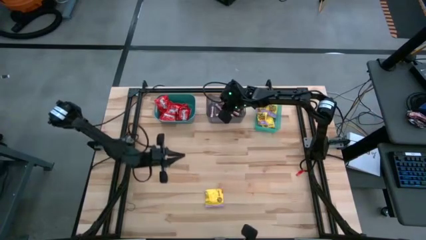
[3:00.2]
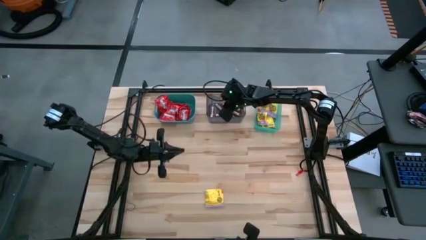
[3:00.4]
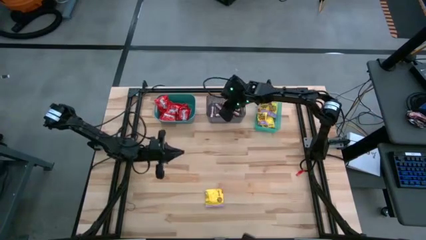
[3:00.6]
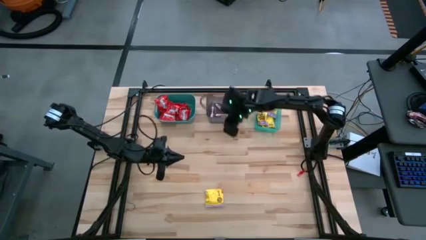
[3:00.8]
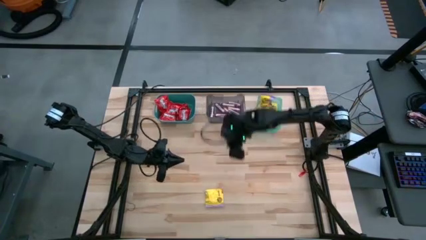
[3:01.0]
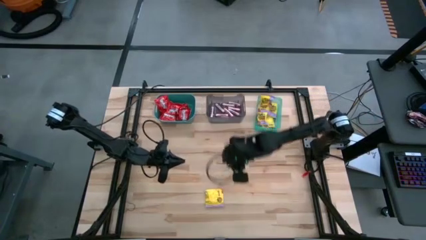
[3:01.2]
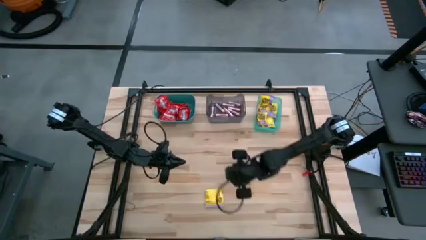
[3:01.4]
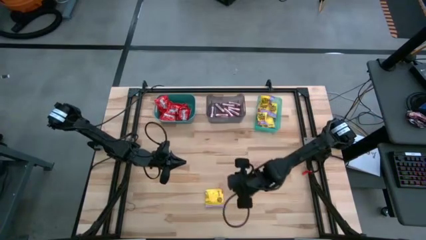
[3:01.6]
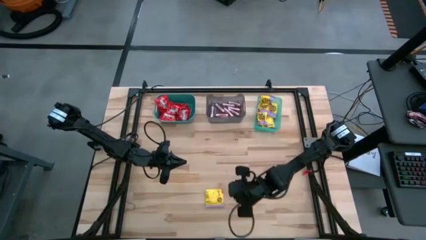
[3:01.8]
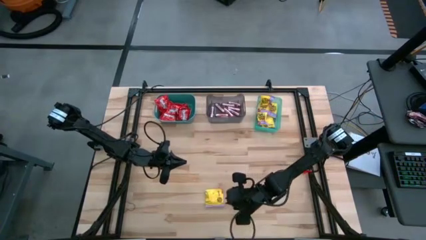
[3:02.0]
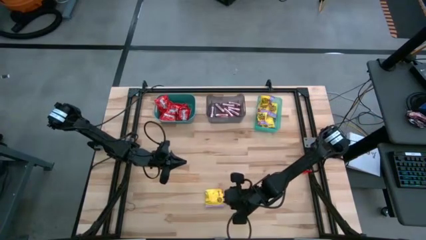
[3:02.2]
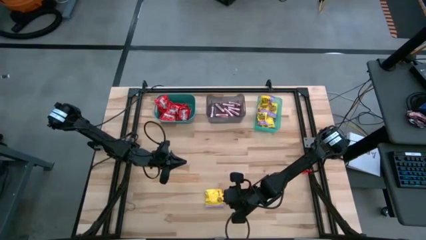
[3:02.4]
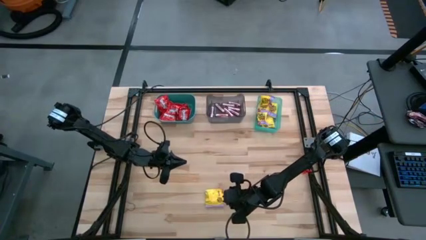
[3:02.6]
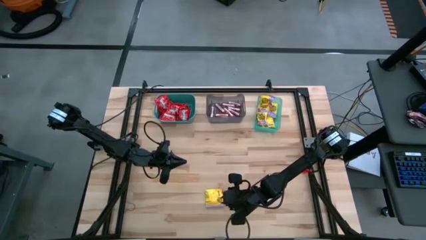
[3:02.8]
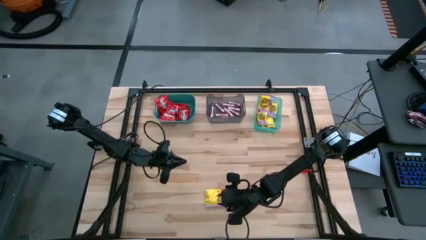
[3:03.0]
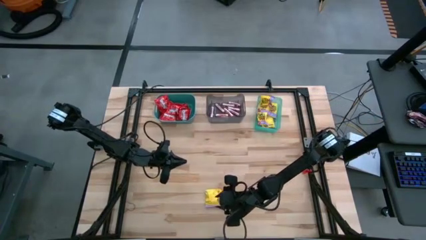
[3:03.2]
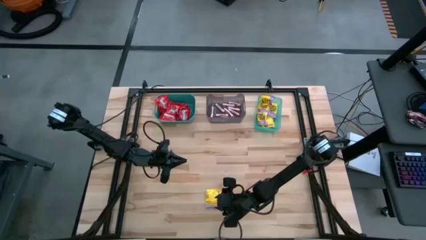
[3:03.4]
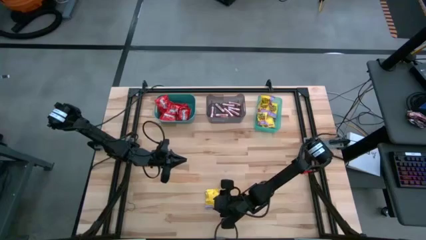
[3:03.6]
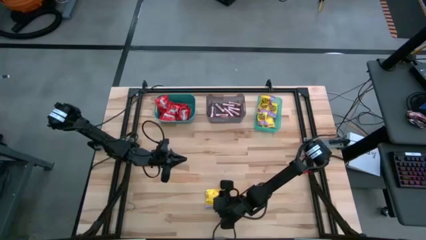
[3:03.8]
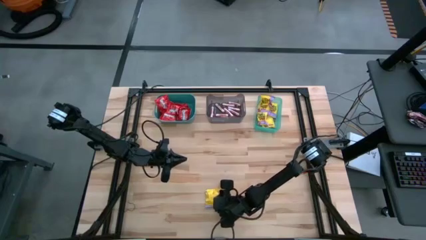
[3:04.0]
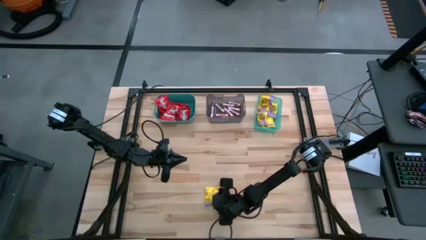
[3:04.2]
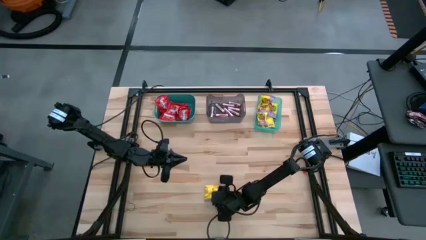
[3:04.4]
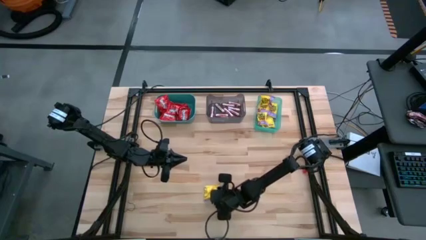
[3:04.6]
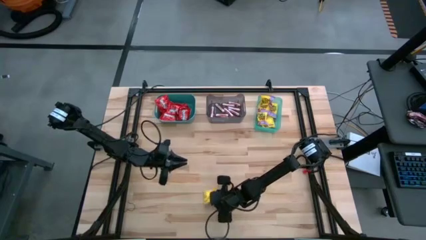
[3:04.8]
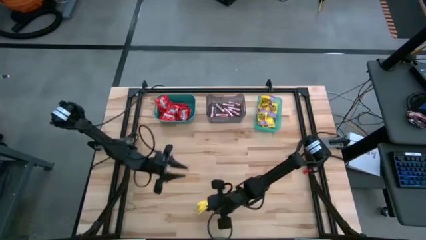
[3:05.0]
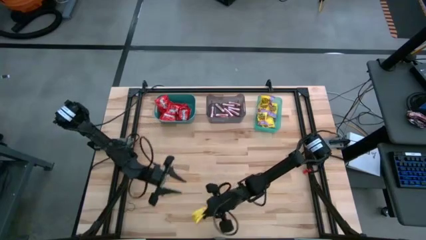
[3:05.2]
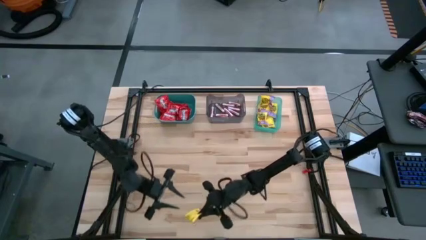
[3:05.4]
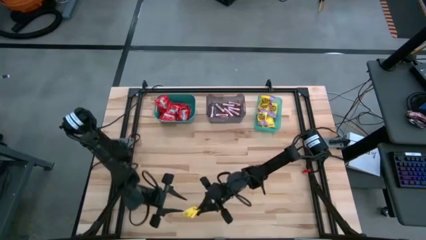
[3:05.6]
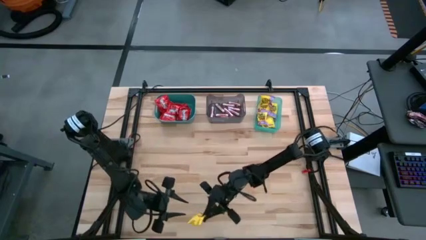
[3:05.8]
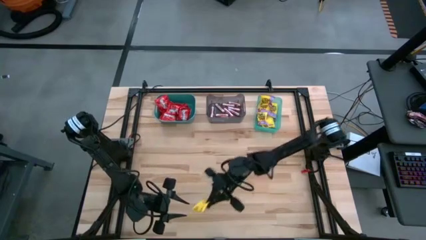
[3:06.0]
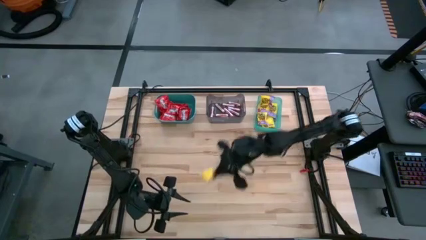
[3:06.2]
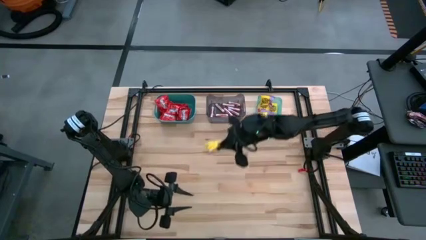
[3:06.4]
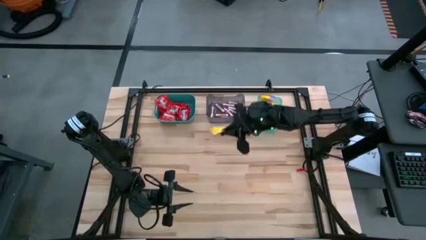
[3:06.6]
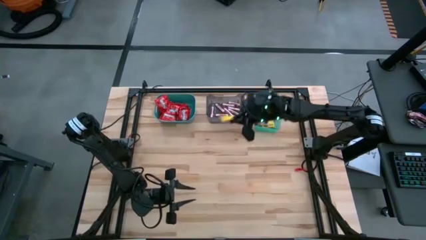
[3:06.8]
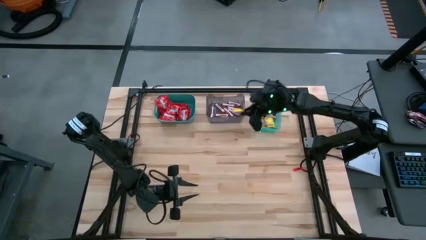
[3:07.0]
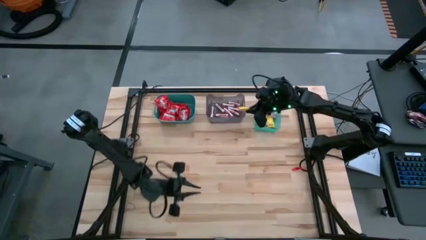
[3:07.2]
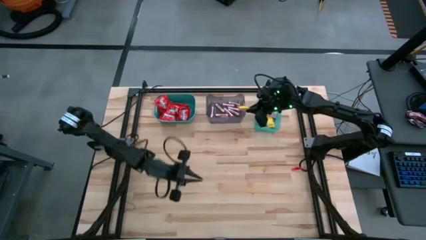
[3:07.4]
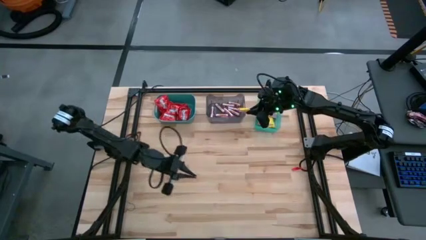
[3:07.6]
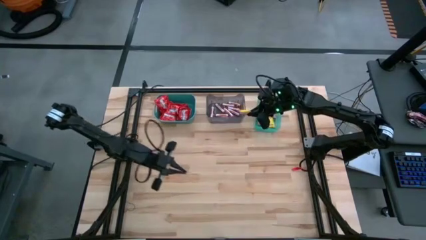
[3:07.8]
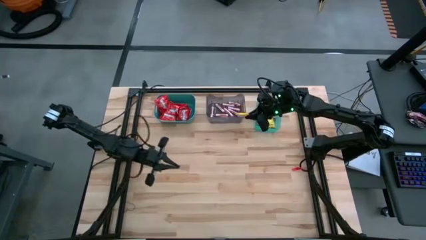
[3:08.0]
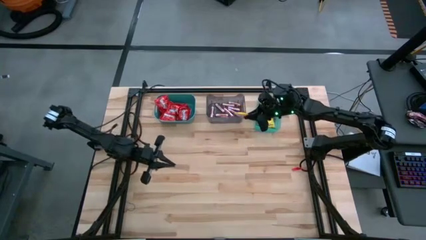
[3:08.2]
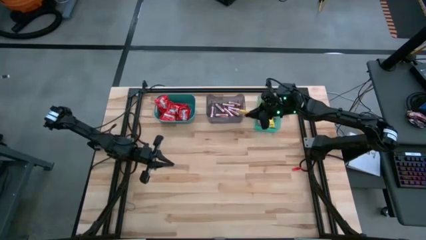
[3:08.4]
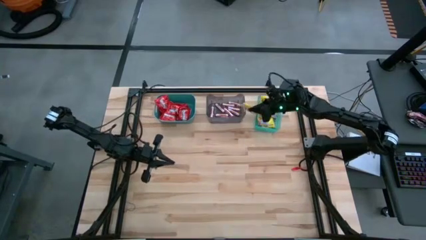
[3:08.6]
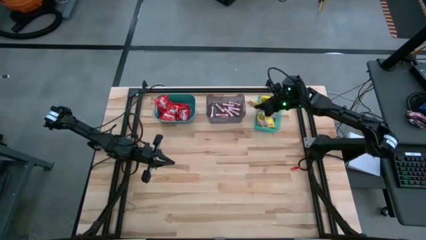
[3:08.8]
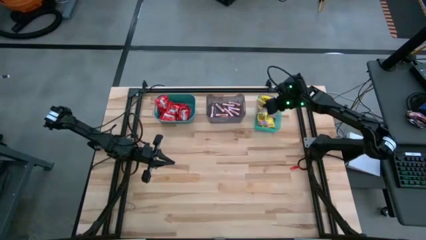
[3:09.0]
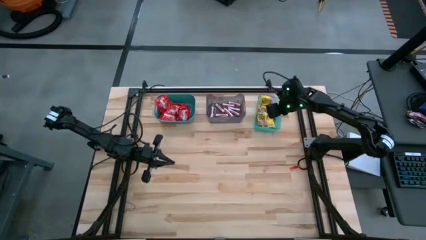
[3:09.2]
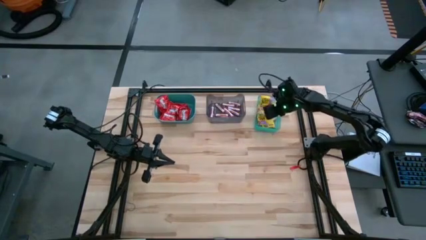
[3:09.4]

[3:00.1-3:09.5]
Task: Sort candy
Put the yellow candy into the light green bin

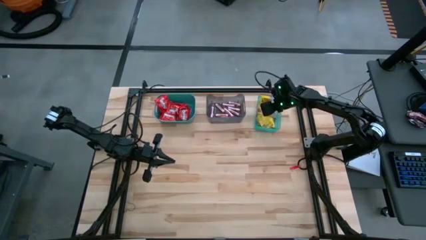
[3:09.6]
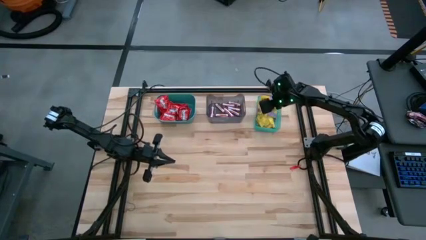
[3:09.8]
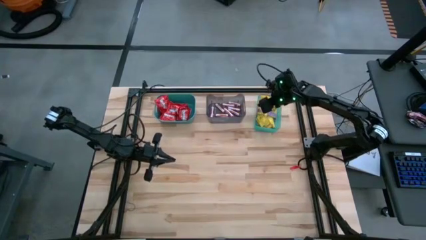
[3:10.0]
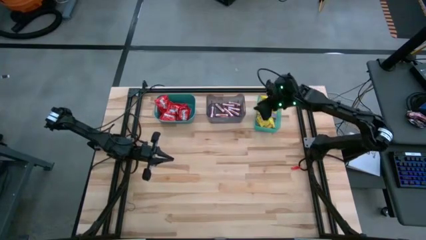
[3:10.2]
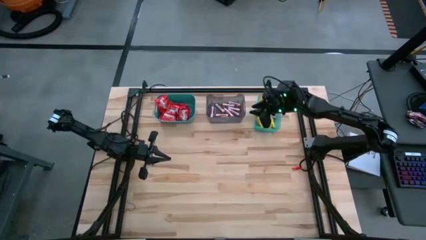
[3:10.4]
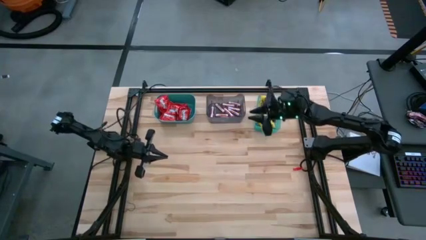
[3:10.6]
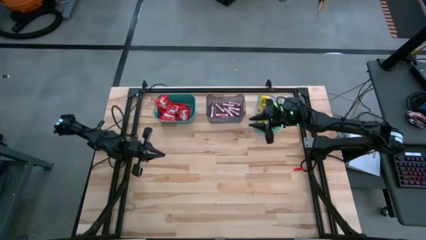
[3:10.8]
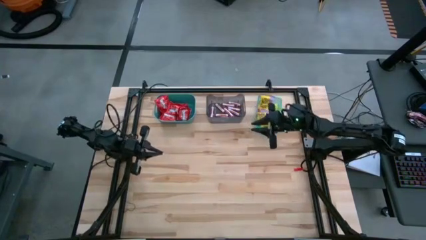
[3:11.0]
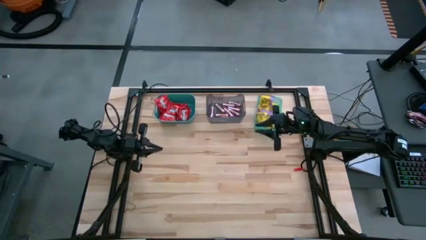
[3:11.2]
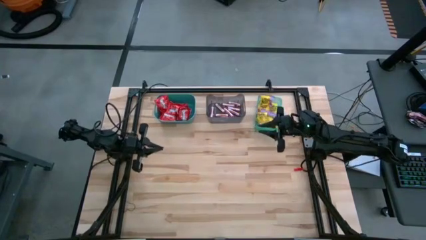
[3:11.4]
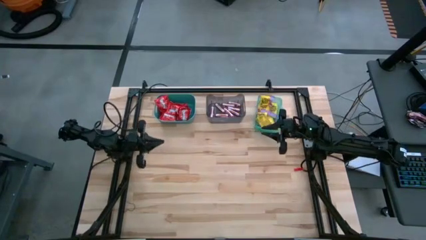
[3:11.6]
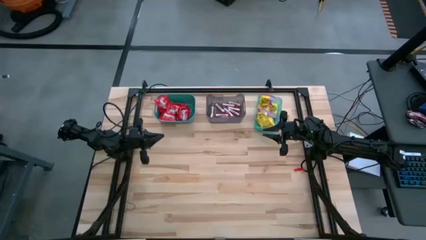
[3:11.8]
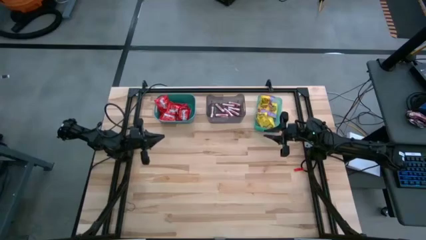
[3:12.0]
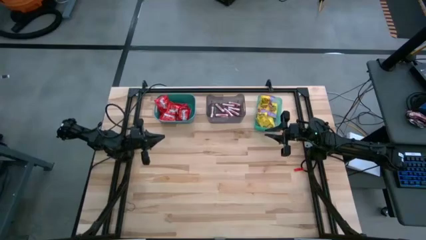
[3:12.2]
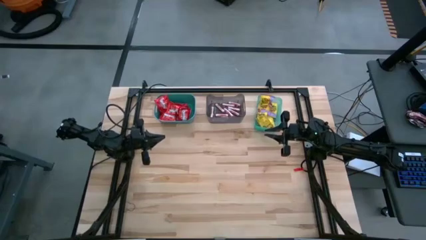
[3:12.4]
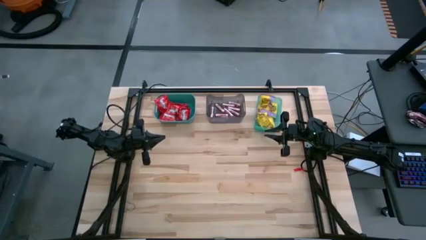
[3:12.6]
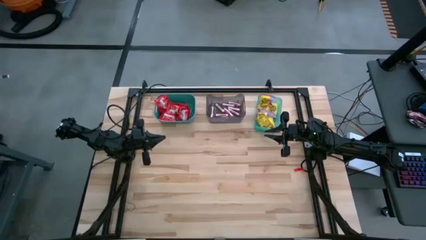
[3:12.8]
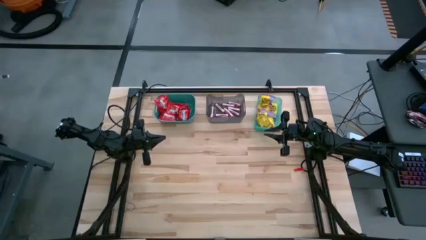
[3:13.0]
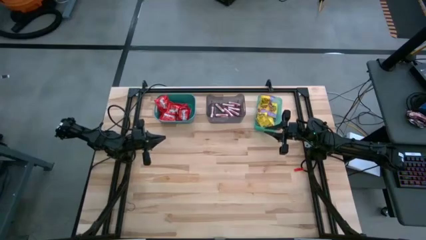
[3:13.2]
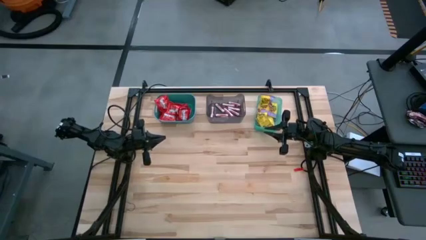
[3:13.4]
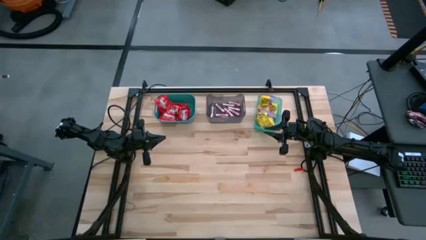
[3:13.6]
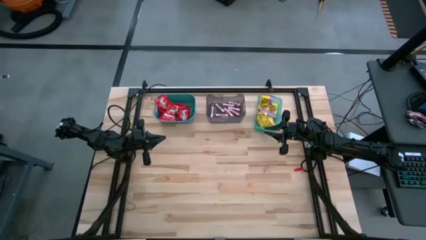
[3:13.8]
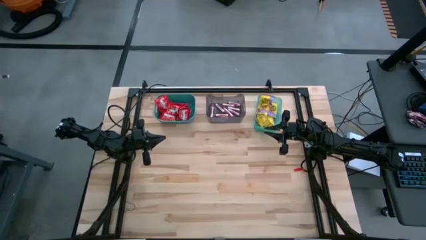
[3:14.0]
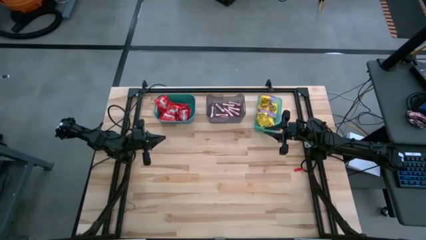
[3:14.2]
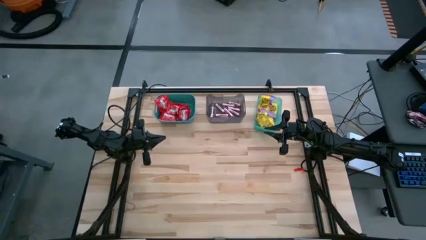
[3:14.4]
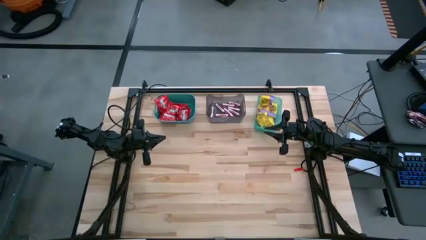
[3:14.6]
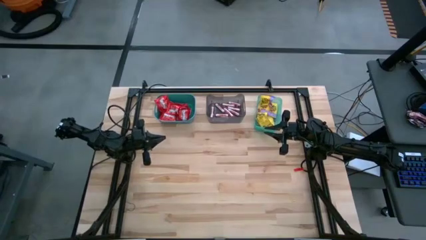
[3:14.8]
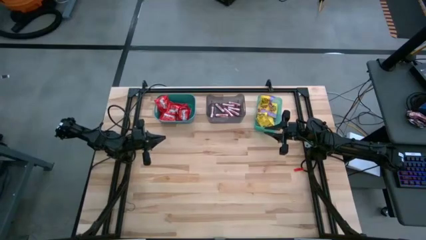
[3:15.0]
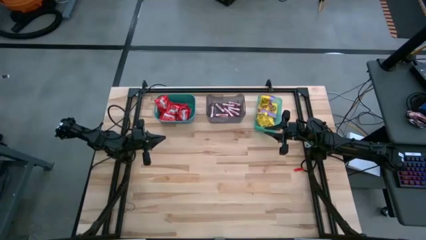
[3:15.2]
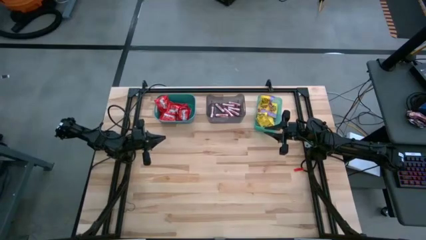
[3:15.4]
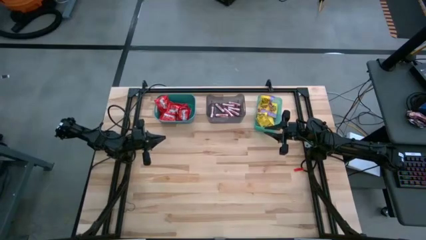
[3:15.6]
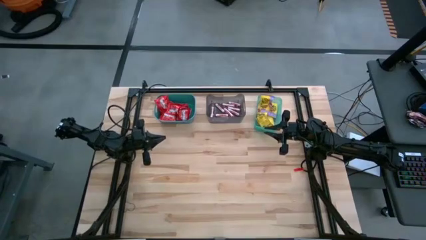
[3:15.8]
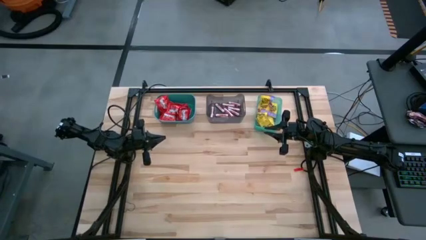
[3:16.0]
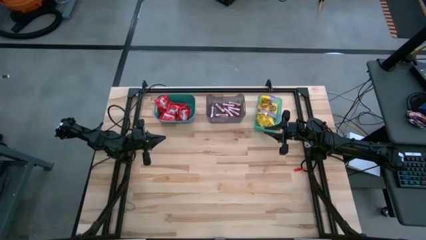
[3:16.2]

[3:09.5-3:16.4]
Return to Home Position

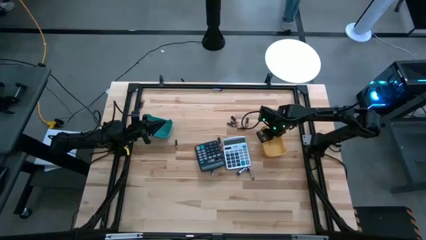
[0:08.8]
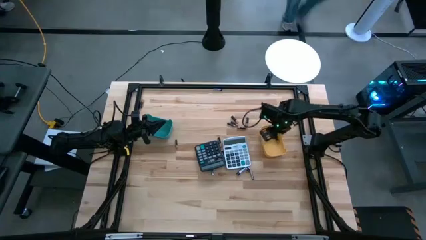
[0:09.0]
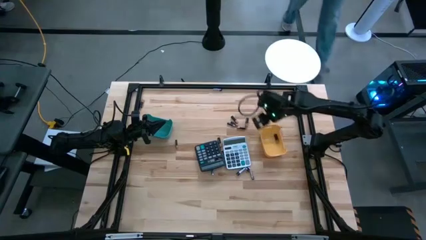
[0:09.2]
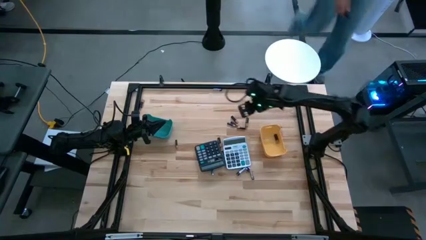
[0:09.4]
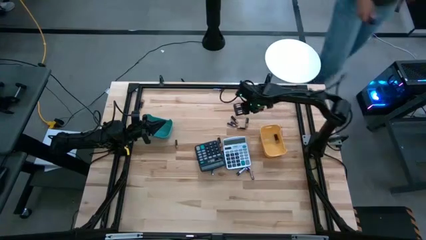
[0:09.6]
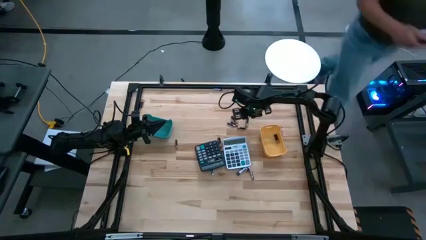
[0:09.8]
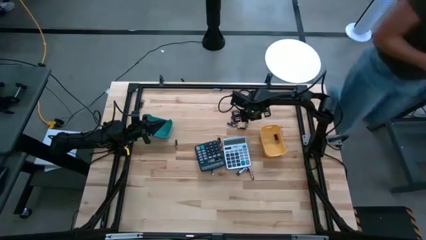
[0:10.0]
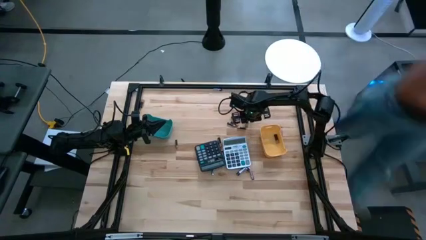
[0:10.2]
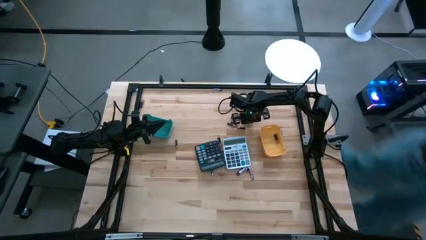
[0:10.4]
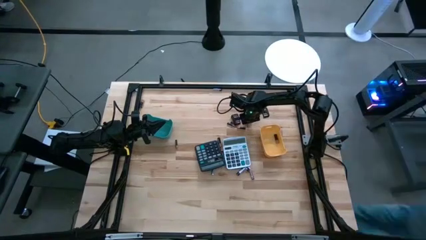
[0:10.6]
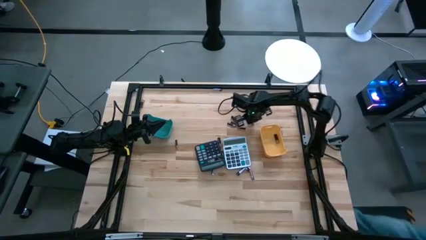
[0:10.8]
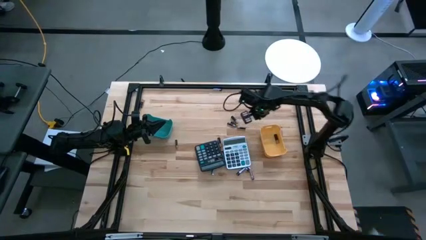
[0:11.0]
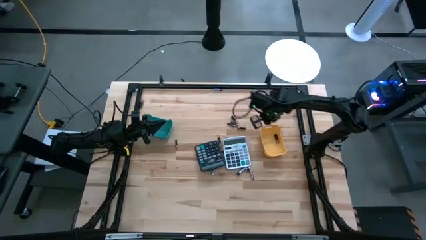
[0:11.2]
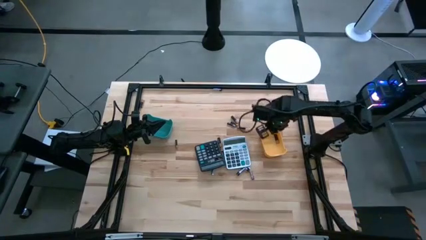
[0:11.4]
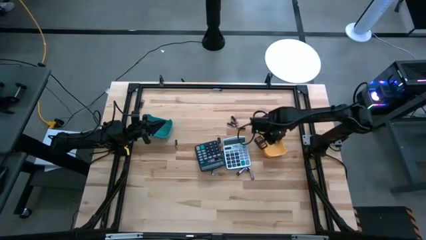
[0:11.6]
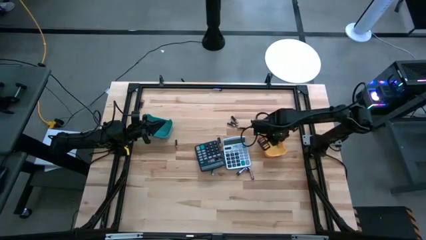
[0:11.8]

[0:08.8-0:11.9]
Task: Sort batteries
Put the black battery into the yellow bin
